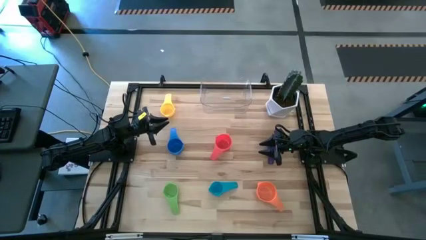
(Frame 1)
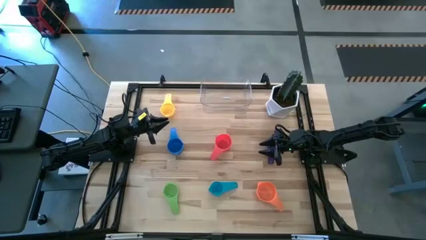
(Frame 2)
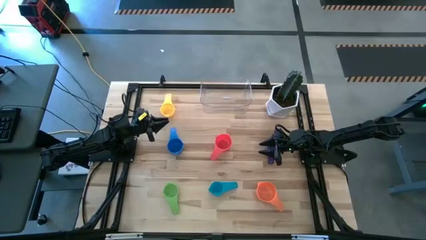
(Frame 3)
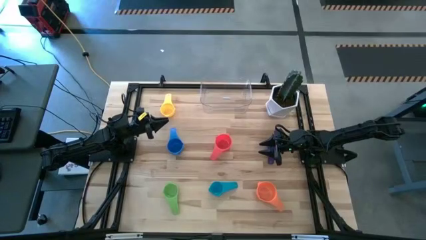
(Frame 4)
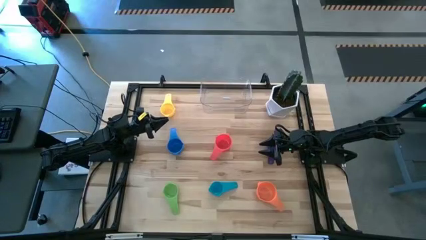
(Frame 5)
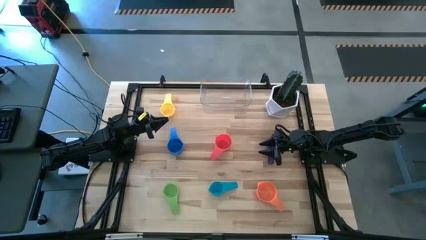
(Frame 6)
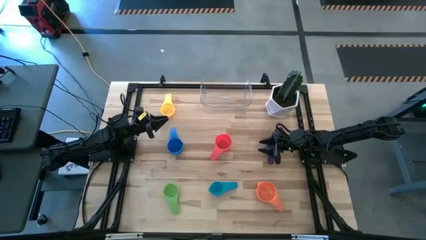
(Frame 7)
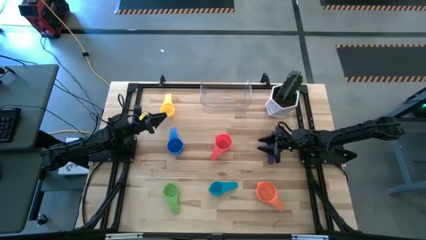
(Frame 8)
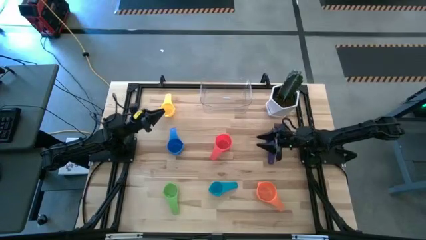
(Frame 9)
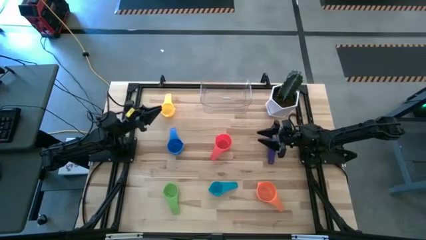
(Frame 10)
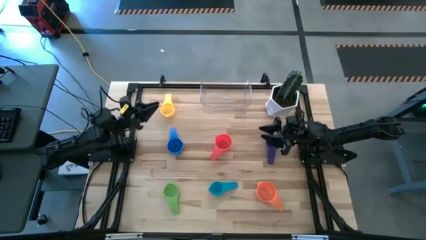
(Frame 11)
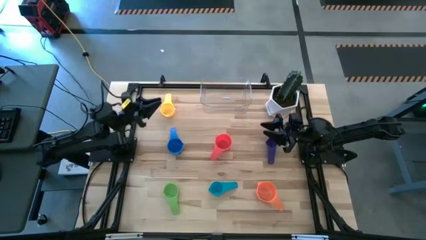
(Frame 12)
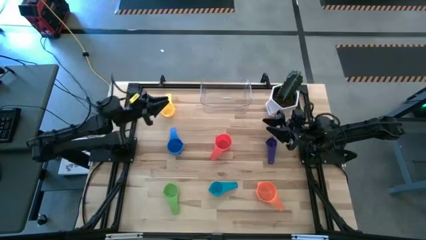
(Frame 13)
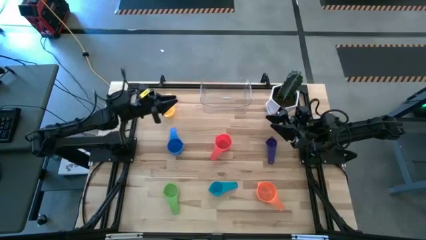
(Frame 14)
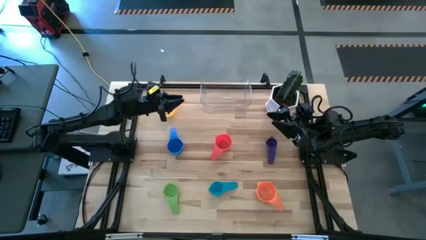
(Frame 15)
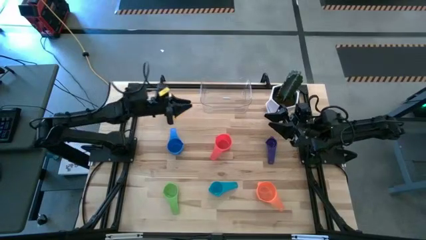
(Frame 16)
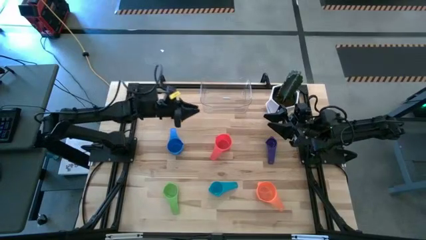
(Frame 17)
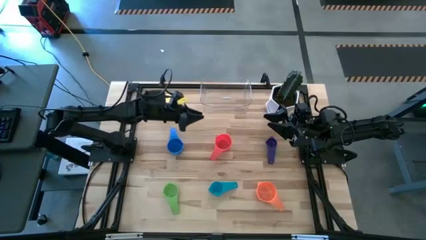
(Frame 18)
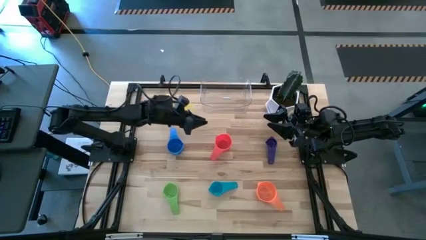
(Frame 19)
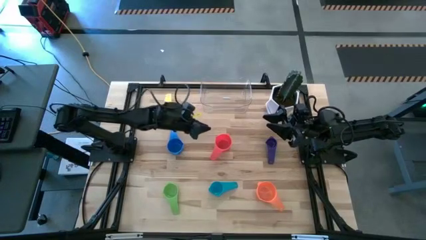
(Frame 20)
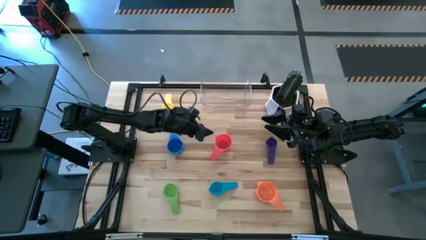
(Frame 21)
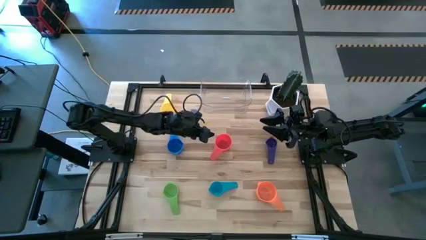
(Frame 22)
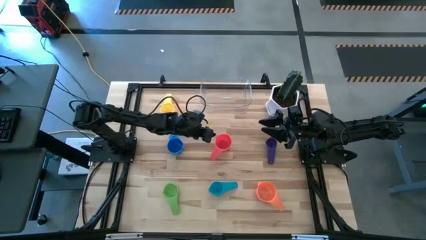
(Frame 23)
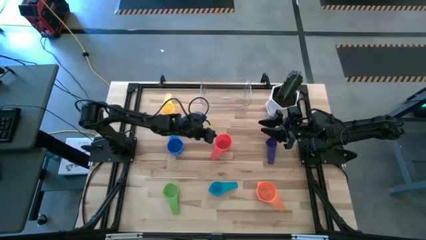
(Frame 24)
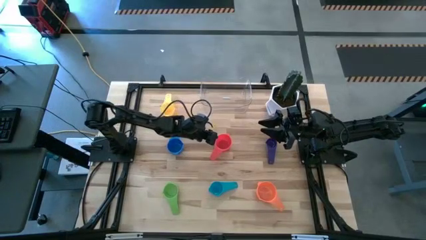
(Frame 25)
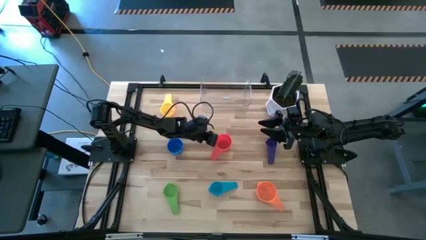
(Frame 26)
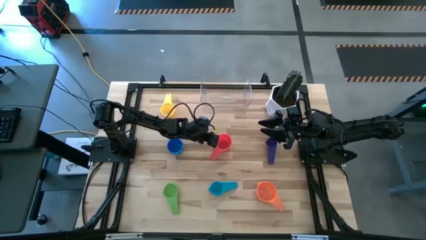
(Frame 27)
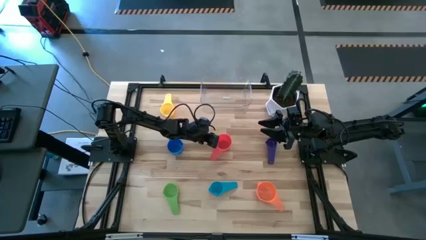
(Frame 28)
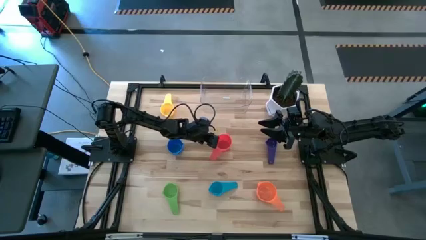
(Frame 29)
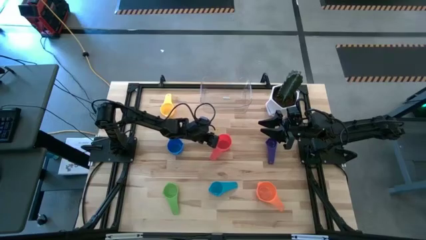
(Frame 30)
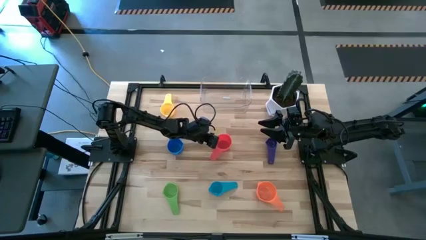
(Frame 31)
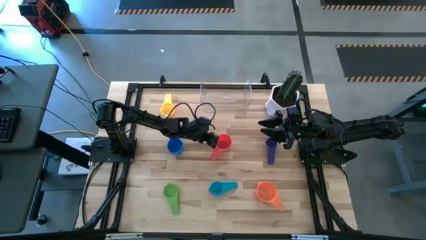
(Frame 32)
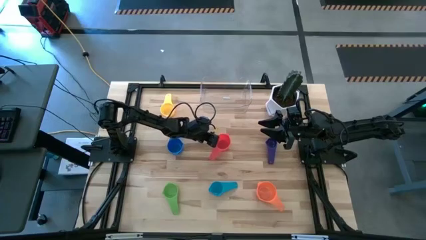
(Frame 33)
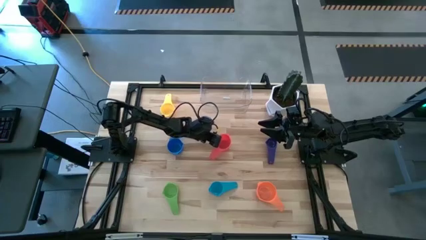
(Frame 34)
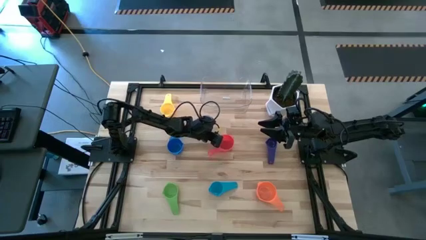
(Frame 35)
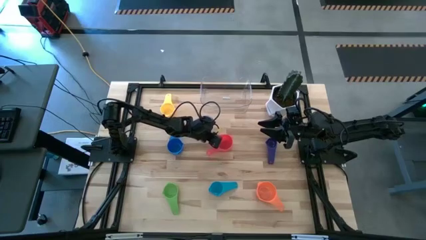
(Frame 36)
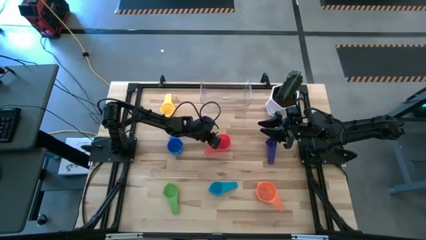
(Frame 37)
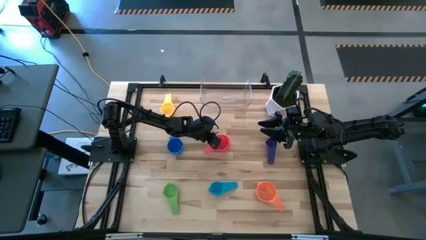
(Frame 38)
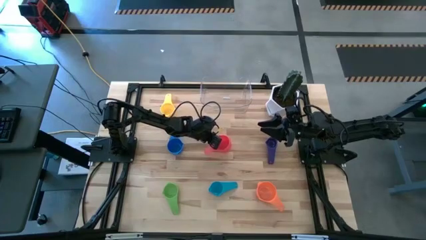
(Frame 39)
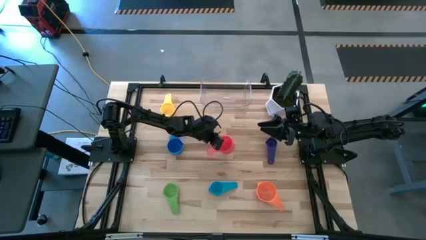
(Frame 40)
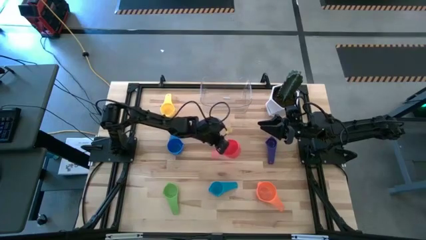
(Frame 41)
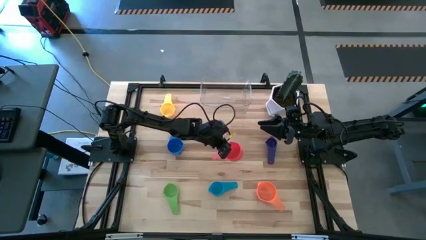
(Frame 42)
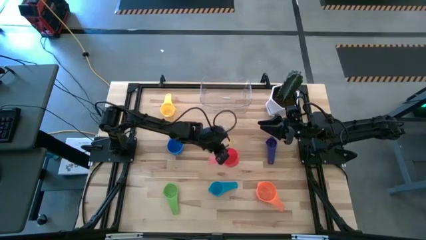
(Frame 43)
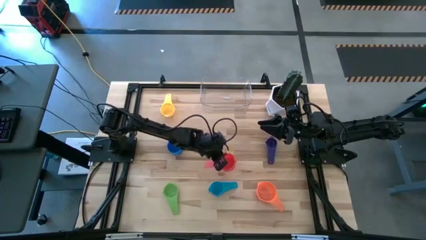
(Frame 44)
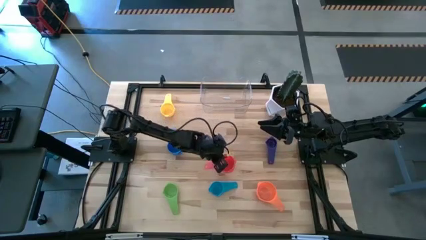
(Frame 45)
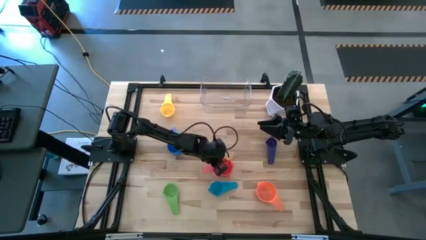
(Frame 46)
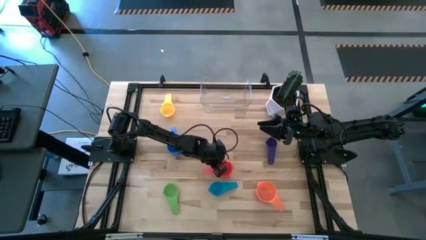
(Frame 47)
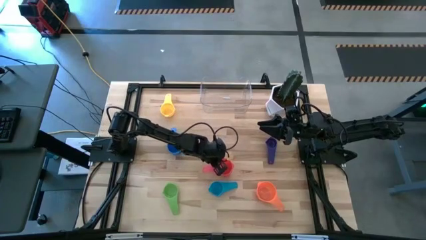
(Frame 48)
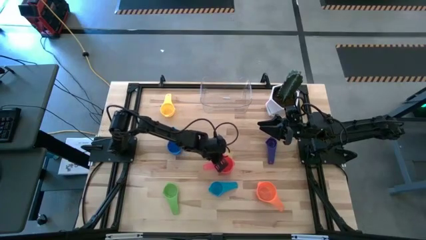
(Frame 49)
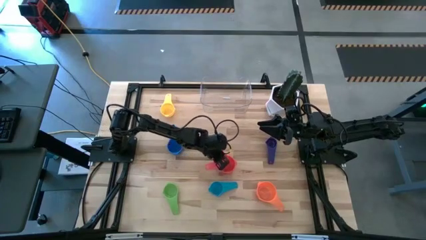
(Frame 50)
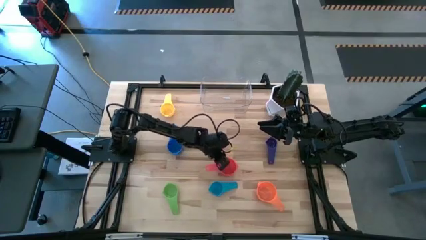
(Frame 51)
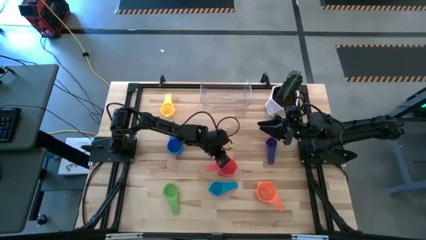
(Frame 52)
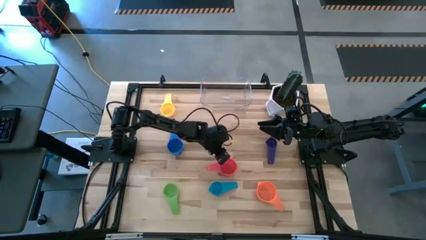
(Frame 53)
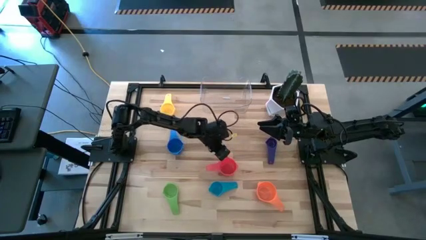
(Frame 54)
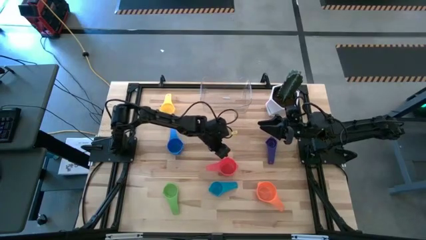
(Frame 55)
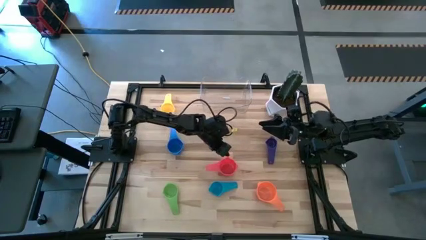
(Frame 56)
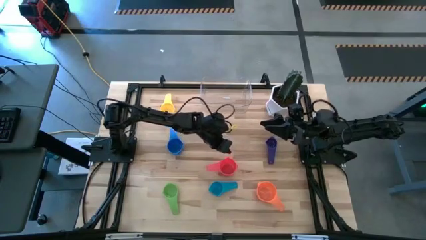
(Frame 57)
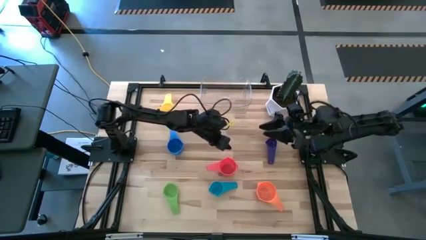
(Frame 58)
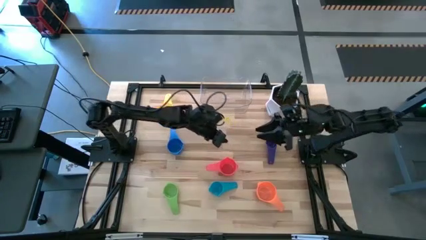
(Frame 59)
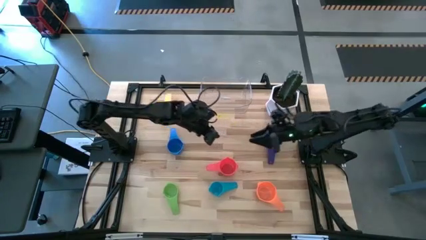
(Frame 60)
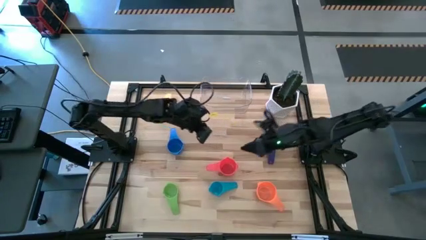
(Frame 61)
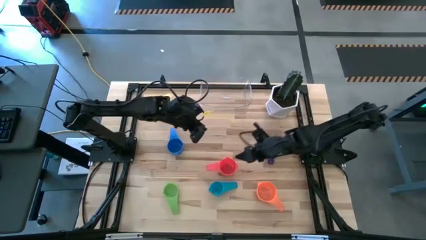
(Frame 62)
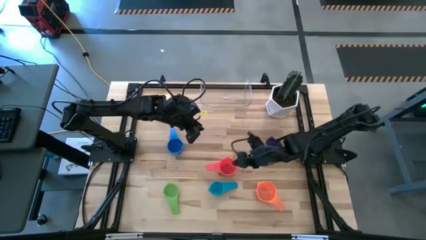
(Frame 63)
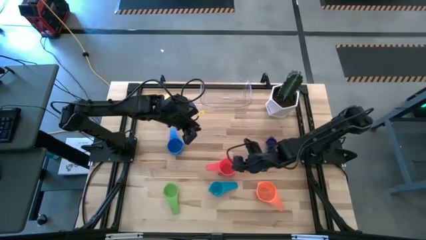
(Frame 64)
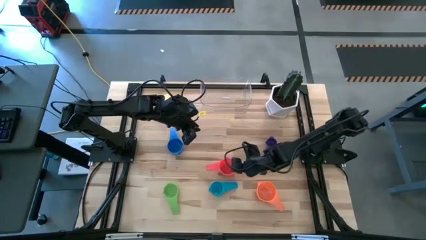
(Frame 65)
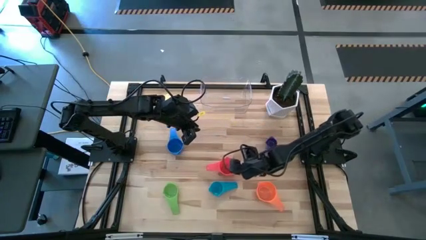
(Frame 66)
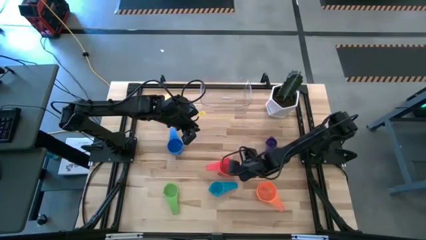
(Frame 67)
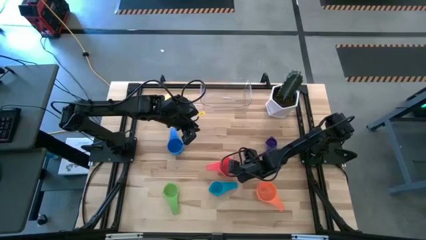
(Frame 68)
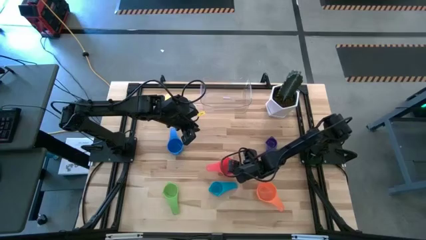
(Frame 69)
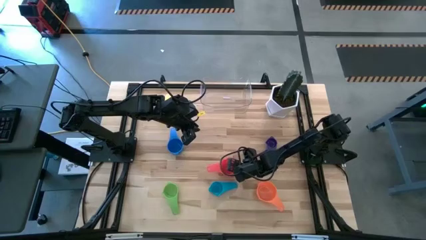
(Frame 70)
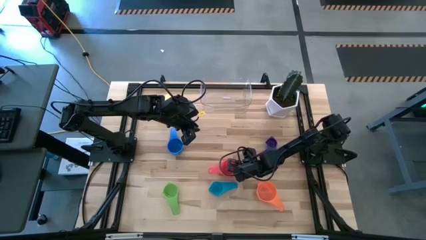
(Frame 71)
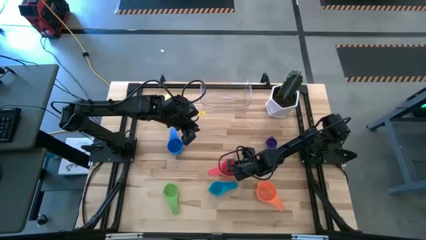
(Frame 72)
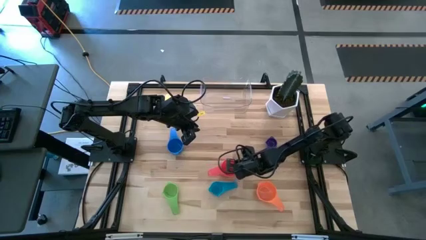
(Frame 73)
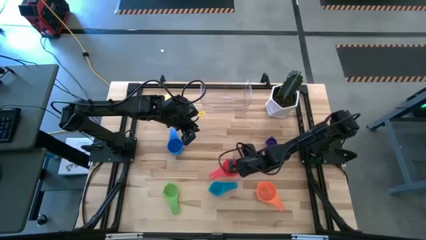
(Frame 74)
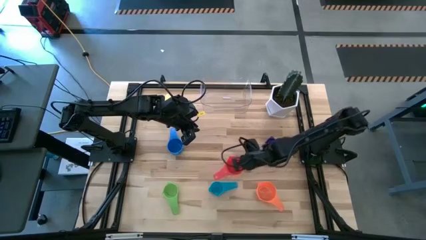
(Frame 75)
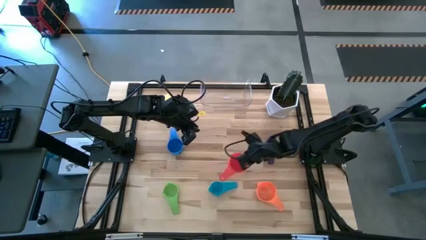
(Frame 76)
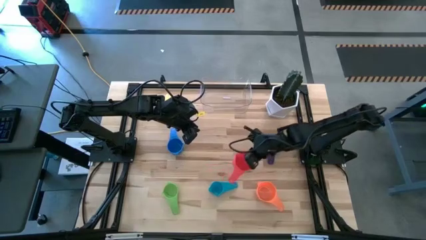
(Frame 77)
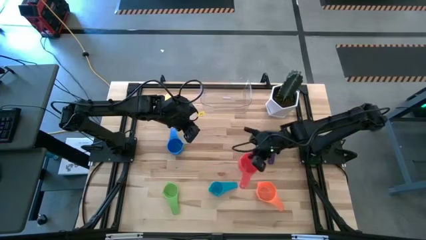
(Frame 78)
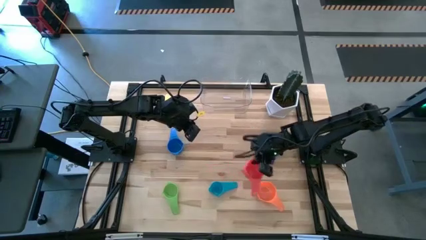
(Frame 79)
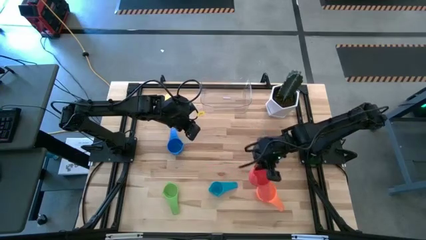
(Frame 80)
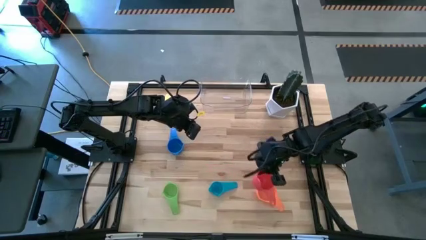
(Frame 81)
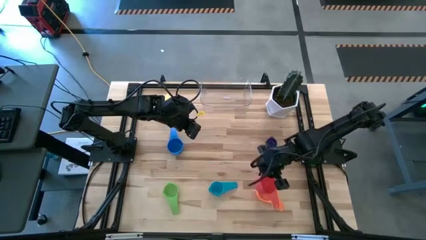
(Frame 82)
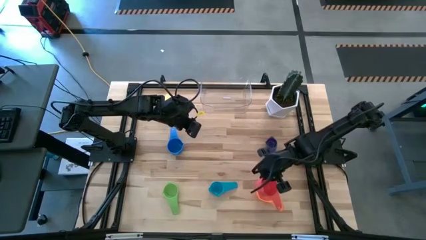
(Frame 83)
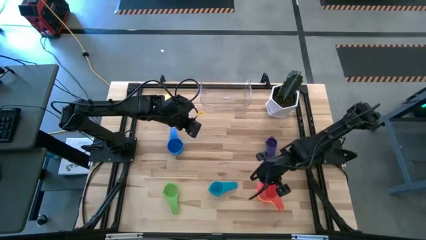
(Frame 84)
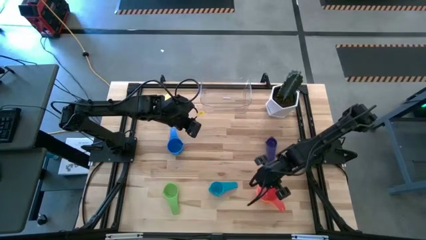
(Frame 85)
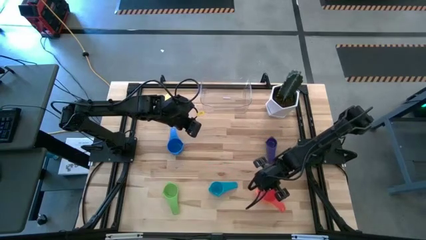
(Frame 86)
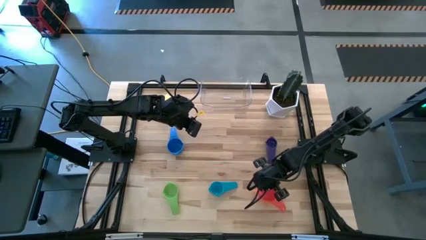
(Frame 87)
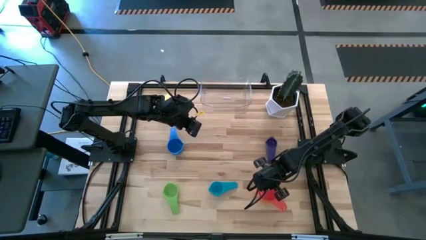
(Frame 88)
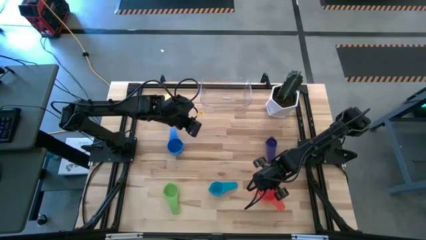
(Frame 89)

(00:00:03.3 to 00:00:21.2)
Task: Nest measuring cups in basket
Stack the red measuring cup on top of the orange measuring cup
